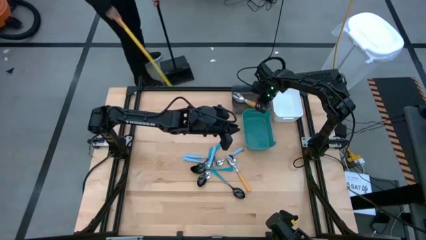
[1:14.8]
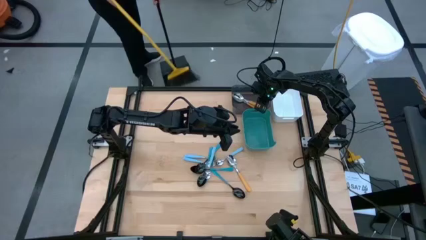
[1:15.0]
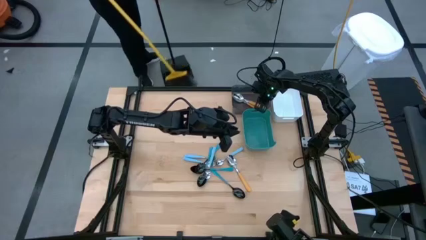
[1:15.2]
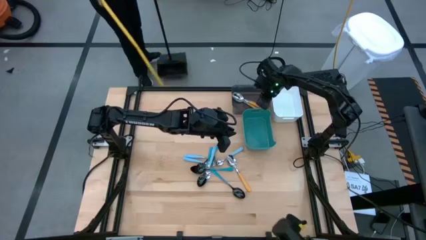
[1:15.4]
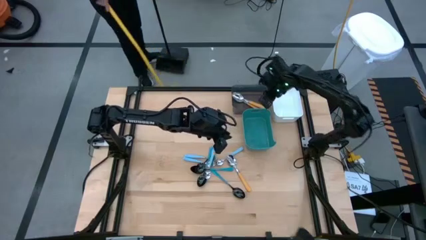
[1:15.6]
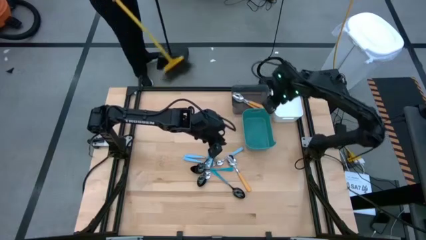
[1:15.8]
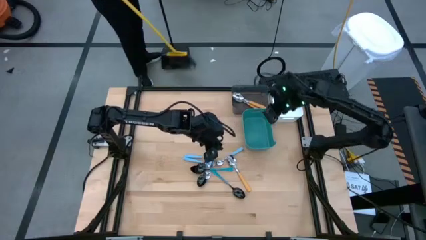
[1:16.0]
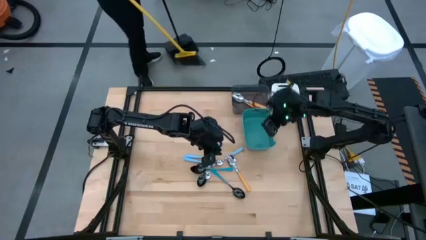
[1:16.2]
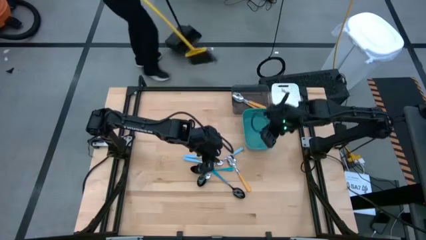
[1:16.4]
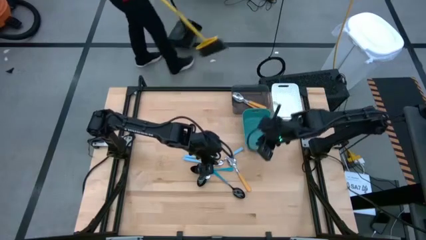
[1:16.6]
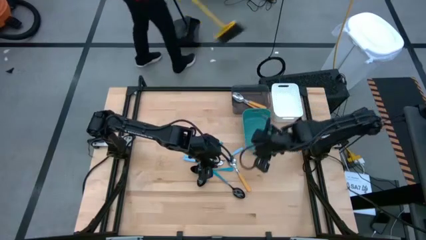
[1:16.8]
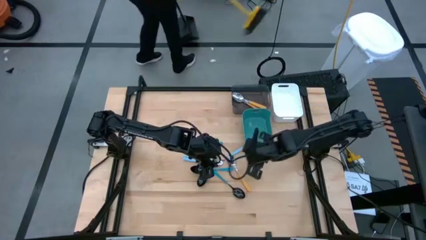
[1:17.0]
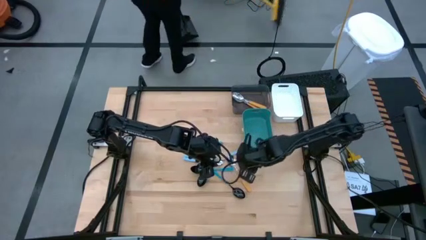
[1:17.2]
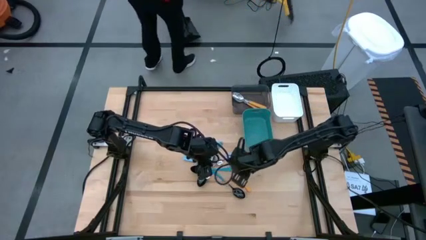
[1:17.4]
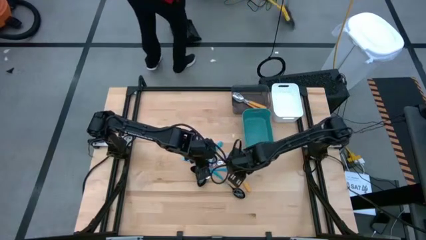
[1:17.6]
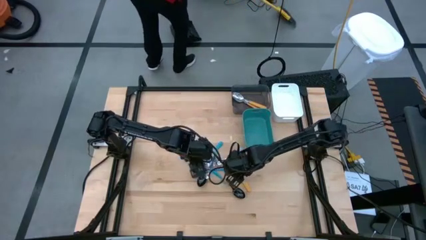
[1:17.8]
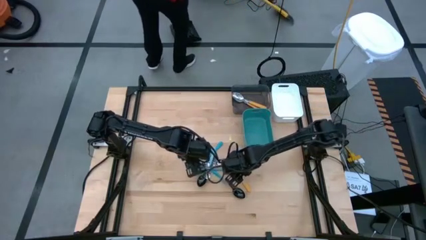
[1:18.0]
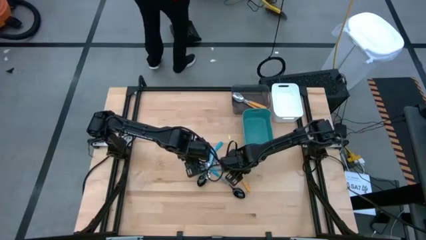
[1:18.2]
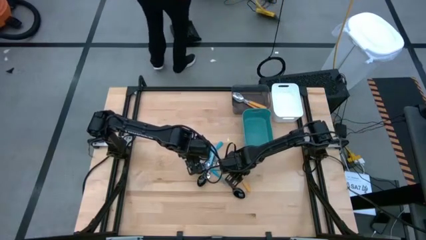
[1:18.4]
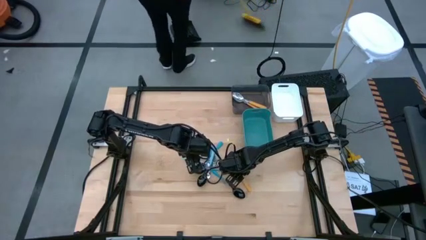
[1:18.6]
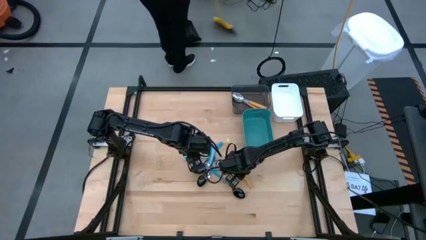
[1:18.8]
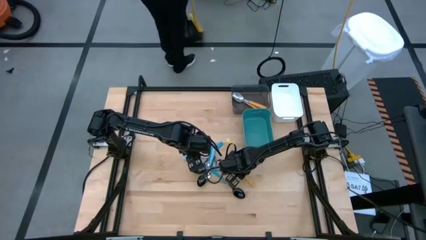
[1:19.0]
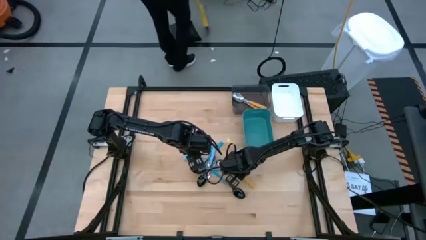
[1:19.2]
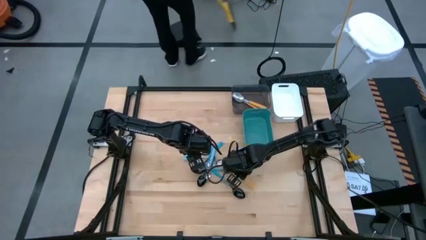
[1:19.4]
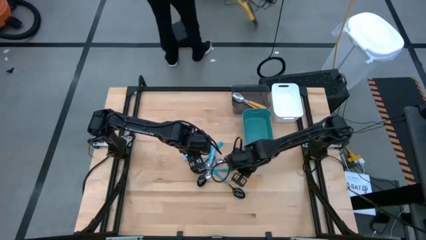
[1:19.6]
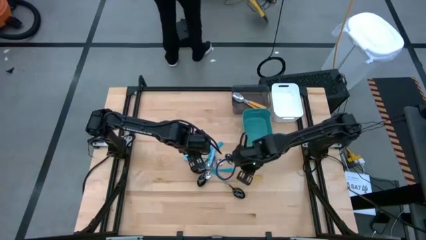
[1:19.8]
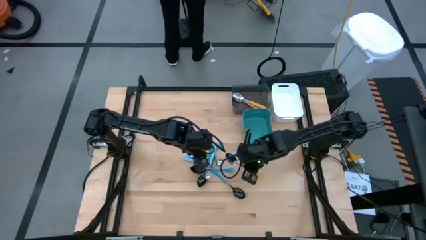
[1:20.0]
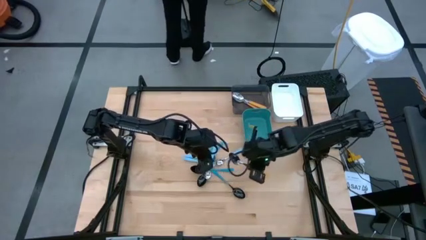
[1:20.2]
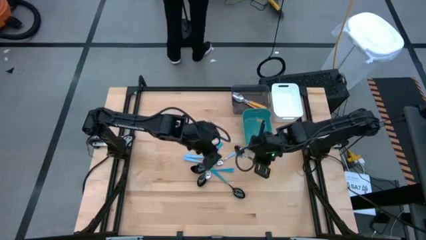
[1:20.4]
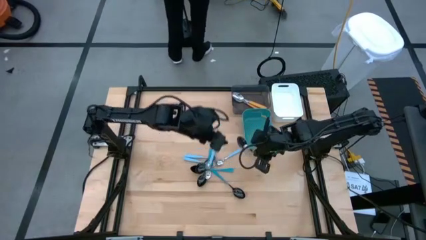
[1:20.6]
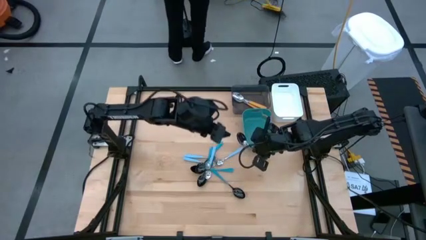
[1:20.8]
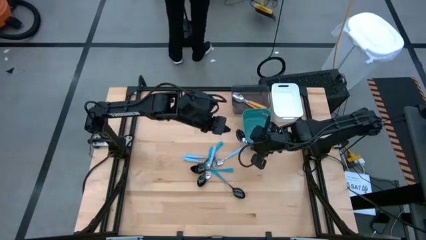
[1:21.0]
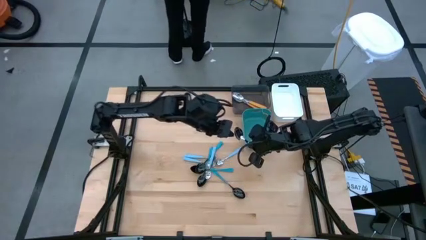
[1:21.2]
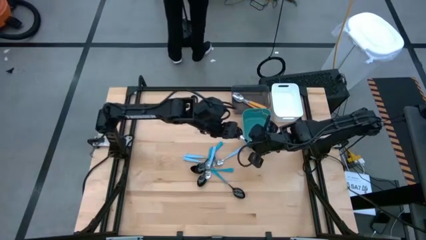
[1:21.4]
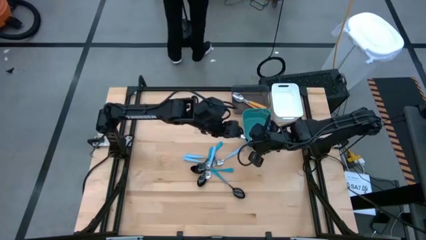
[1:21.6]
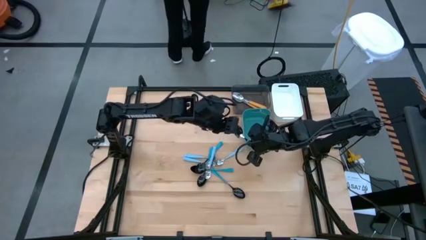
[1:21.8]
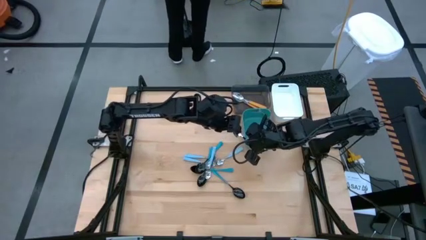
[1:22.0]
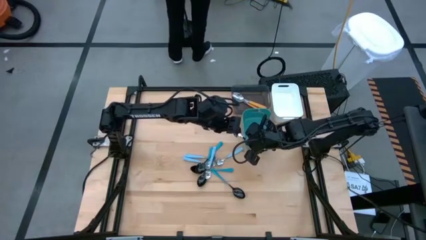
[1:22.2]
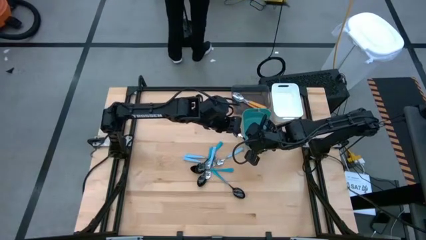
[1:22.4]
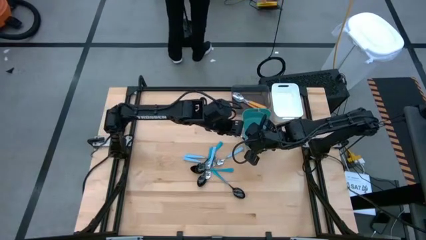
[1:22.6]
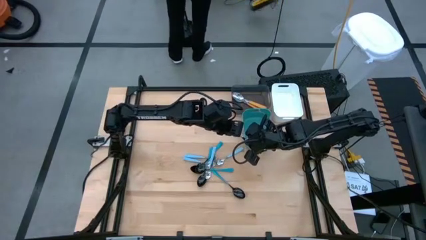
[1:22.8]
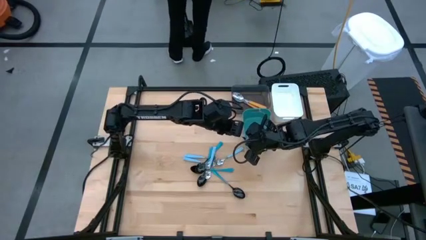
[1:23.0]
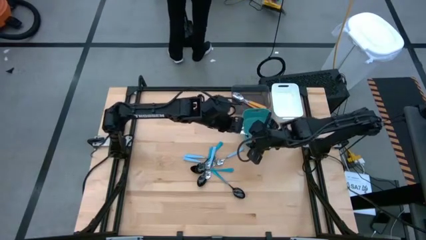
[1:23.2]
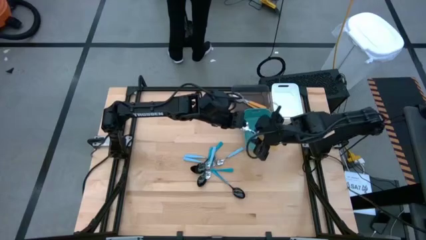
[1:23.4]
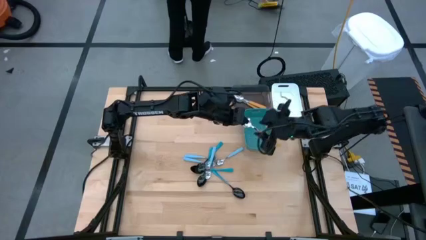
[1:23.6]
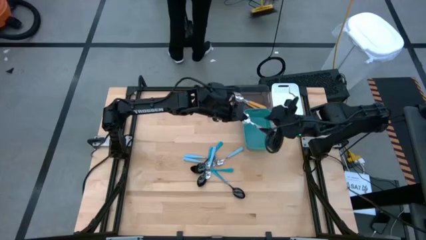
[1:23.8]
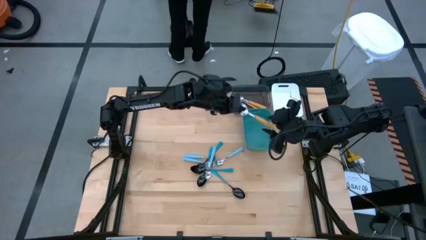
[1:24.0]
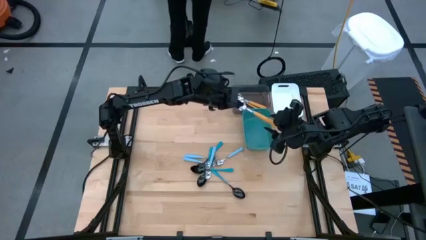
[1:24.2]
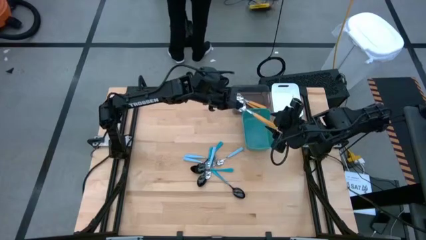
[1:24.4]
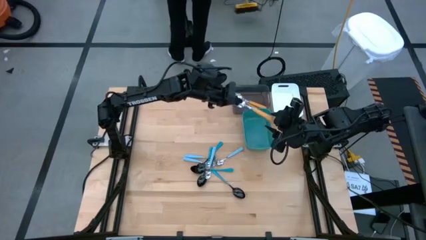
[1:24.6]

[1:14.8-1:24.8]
Task: Sort silverware by color (type)
Put the orange spoon into the black bin

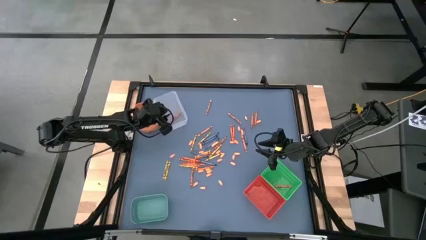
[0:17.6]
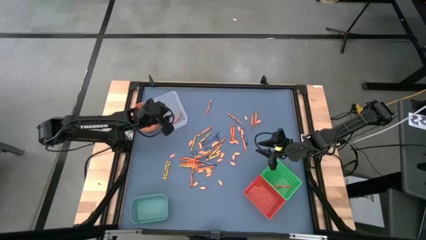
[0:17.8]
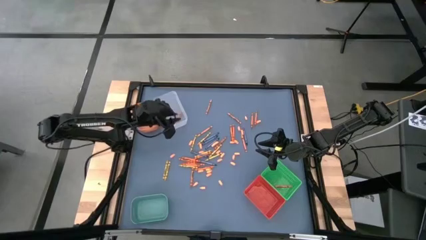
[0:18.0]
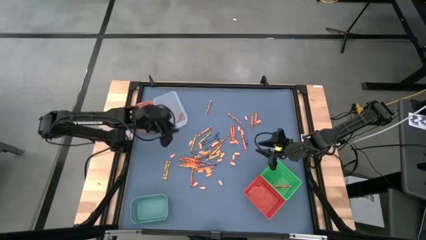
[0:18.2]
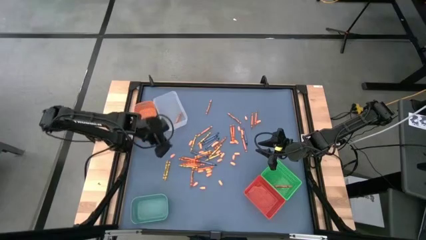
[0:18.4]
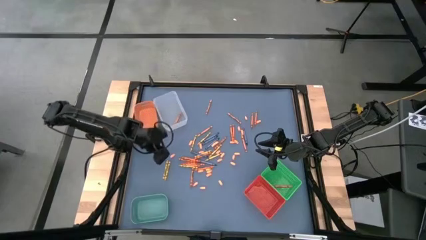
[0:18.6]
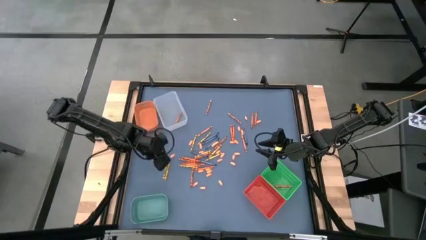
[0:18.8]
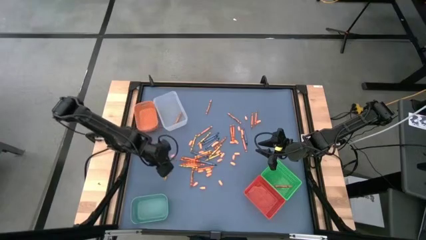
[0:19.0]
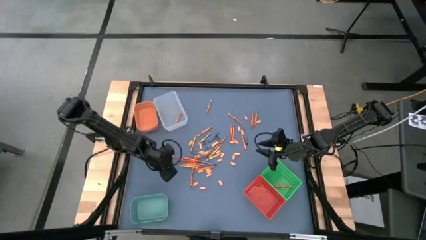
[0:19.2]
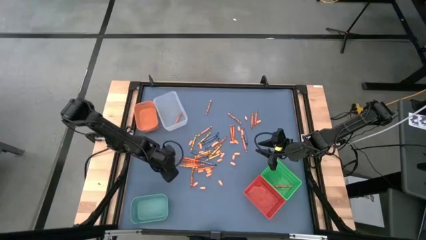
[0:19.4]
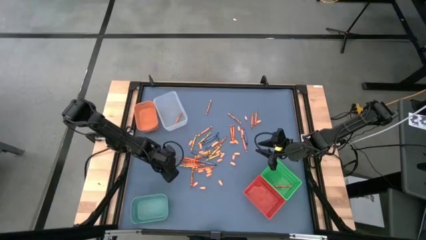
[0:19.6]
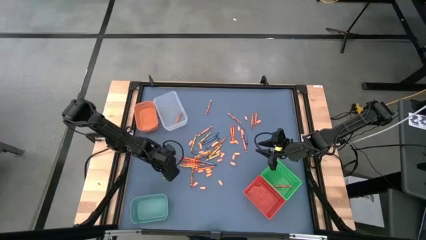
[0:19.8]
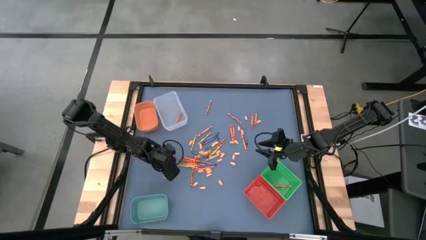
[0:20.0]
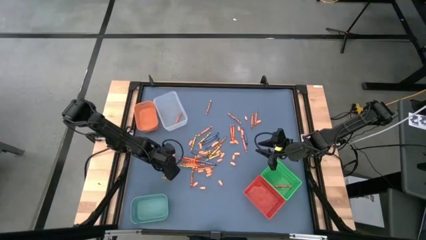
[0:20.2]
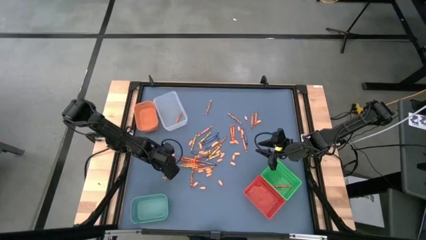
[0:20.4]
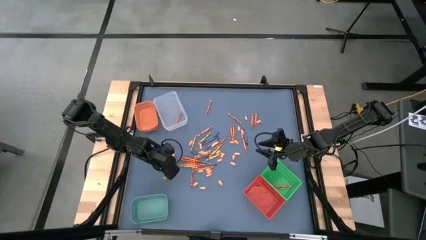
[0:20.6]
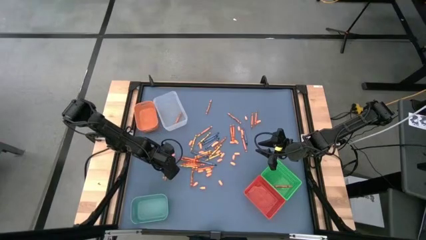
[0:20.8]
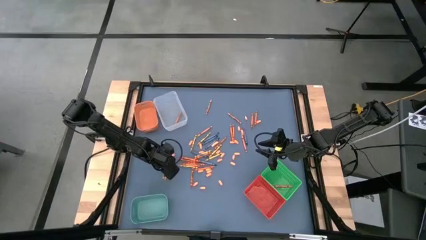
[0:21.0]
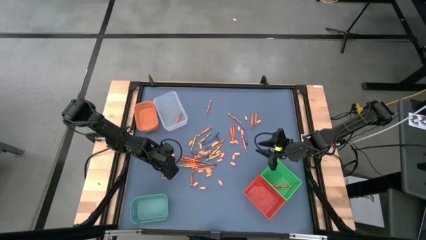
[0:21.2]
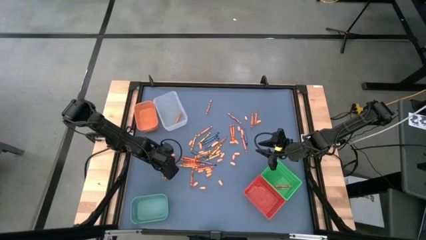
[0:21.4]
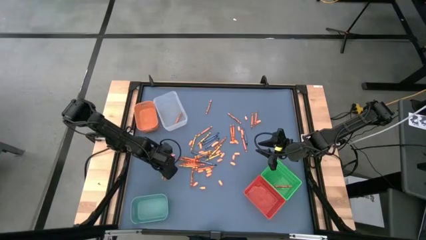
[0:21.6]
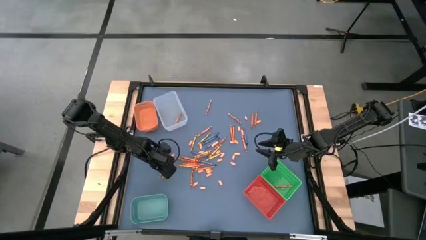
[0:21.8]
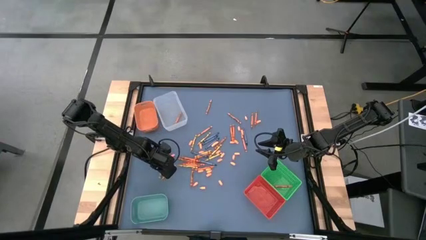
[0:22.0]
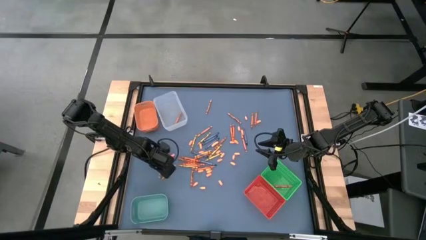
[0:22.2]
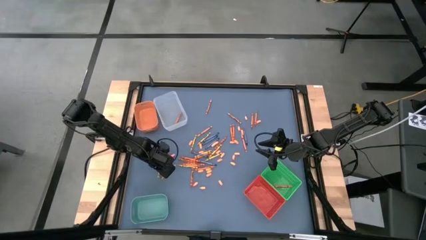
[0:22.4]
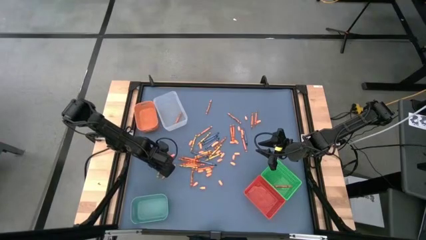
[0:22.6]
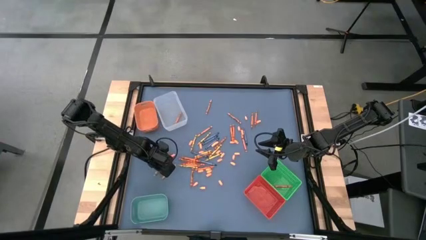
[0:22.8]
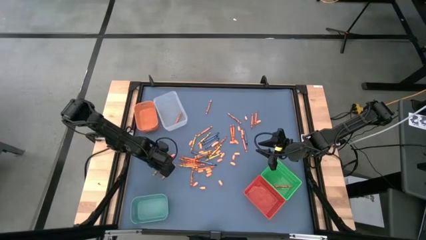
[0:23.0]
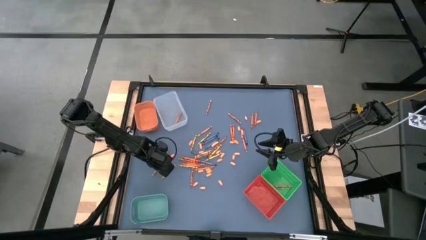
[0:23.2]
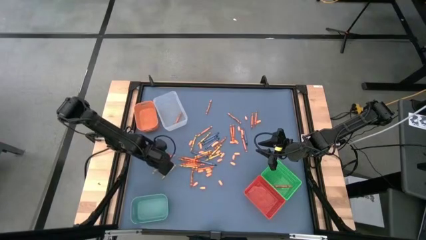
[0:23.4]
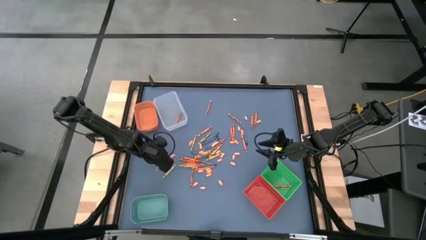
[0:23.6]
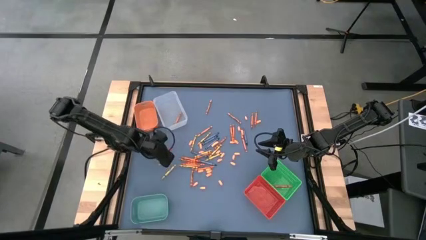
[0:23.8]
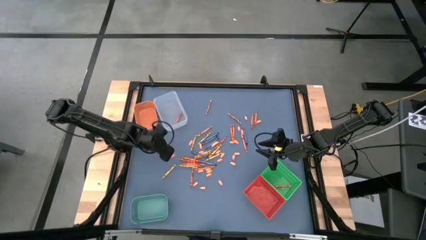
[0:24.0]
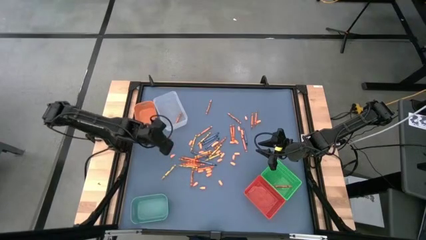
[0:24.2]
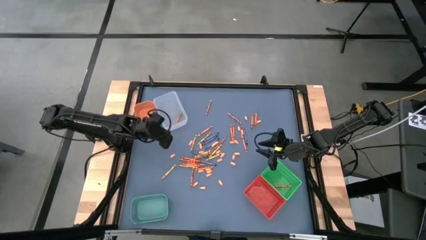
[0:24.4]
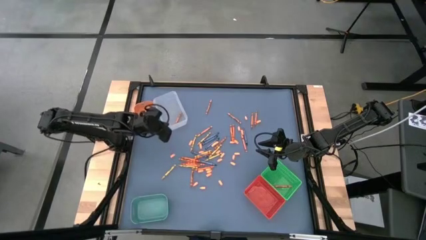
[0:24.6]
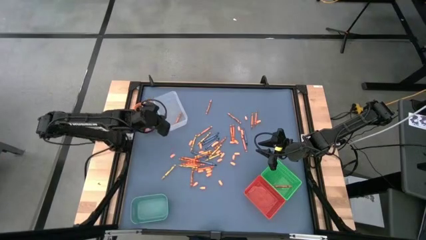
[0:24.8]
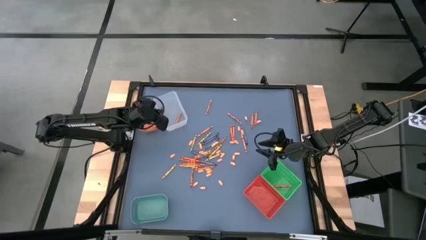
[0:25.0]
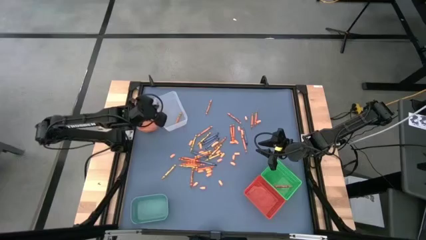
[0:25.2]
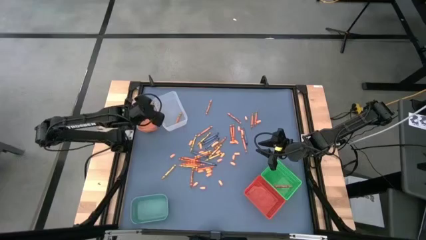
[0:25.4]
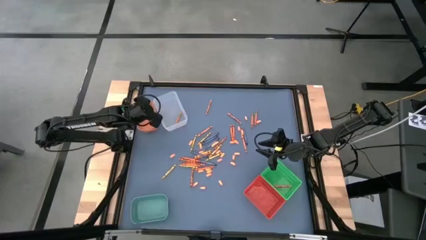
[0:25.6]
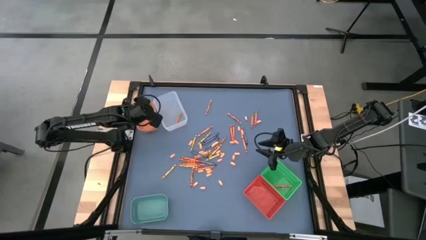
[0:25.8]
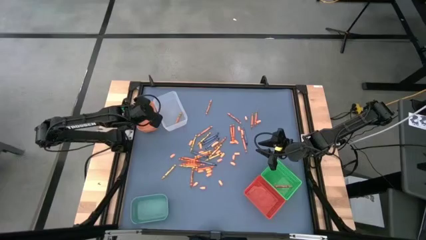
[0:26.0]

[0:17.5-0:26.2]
Task: Sort crayons
Put the yellow crayon into the orange bin
